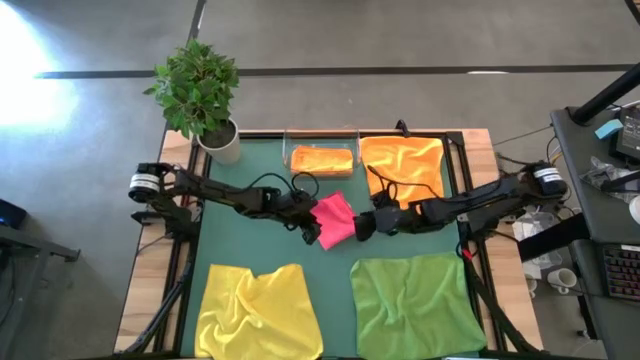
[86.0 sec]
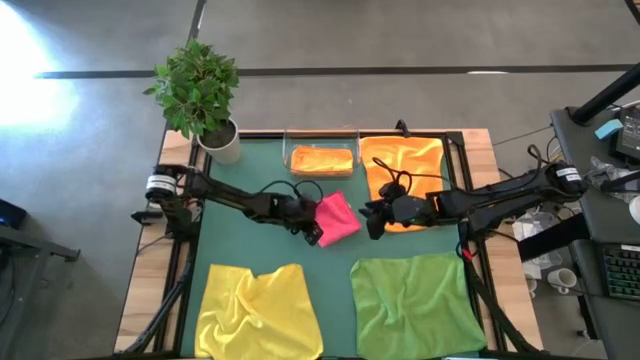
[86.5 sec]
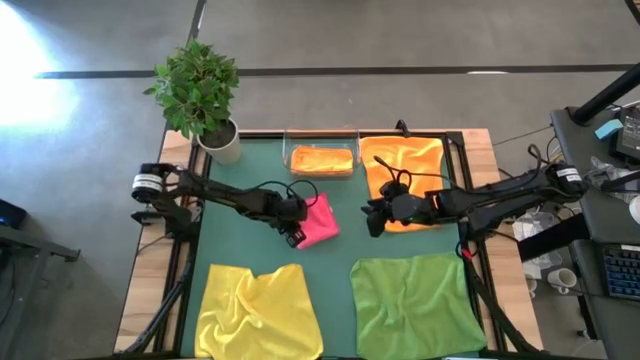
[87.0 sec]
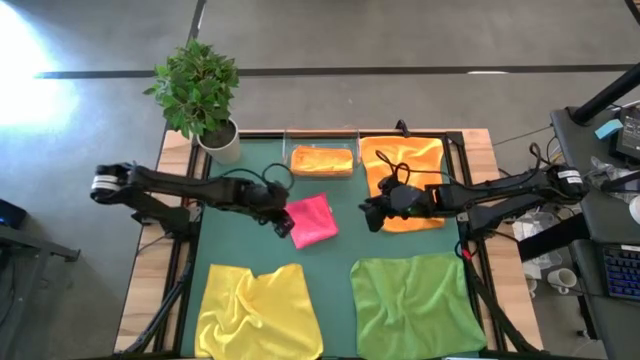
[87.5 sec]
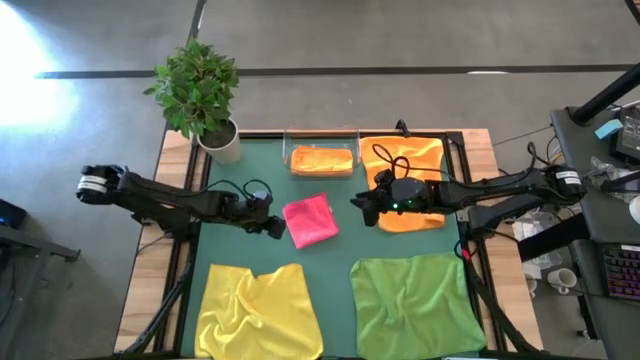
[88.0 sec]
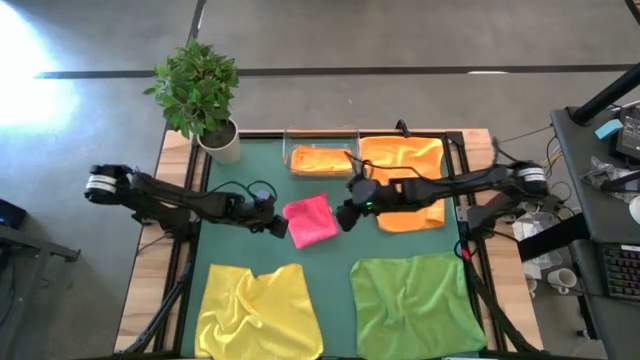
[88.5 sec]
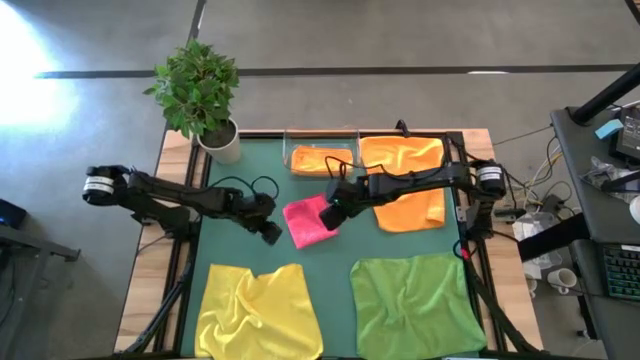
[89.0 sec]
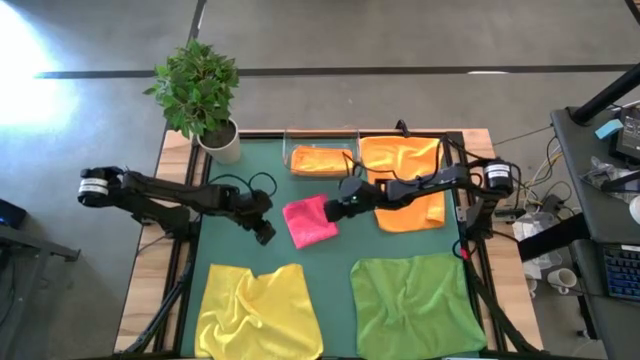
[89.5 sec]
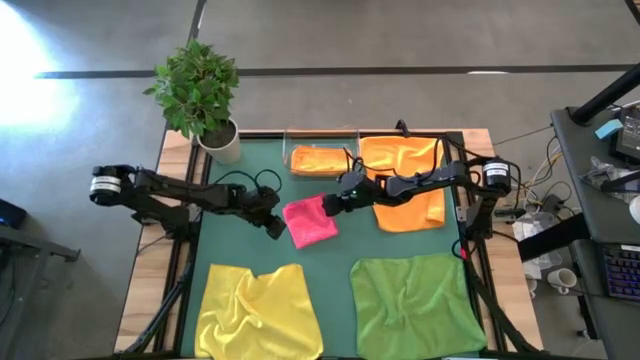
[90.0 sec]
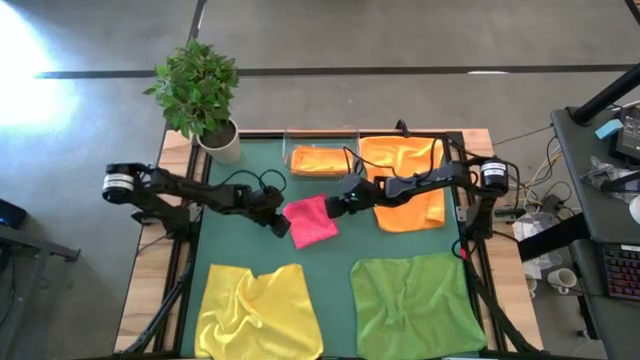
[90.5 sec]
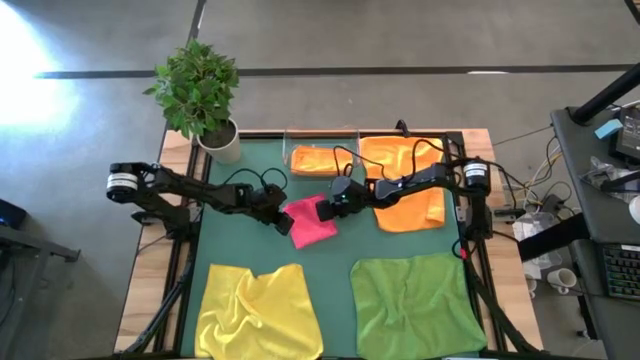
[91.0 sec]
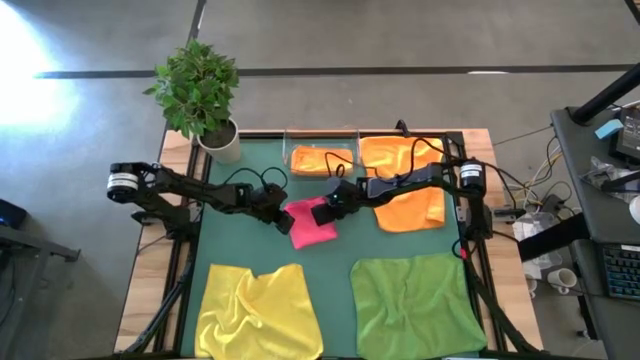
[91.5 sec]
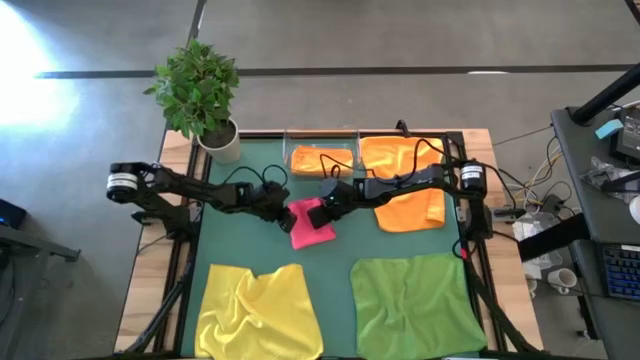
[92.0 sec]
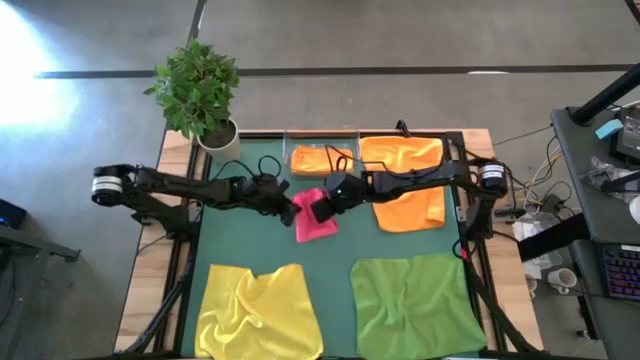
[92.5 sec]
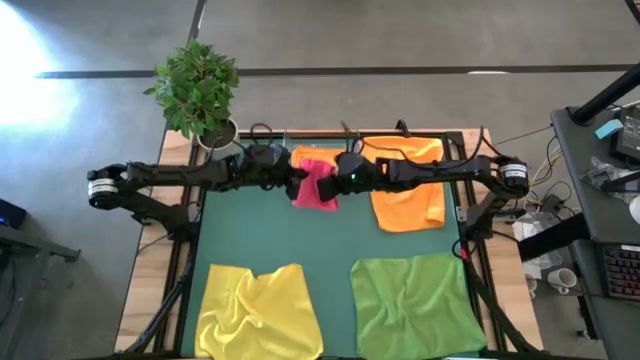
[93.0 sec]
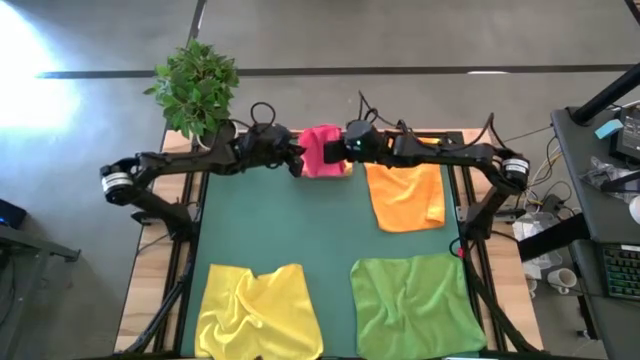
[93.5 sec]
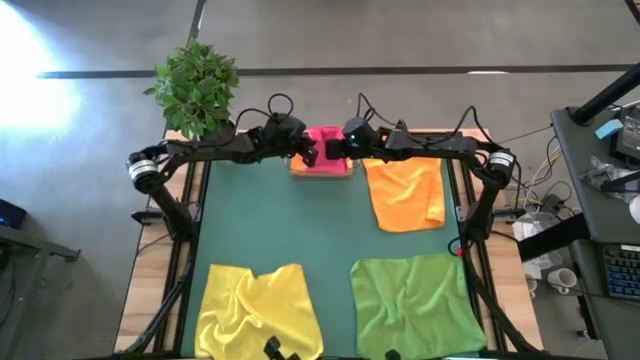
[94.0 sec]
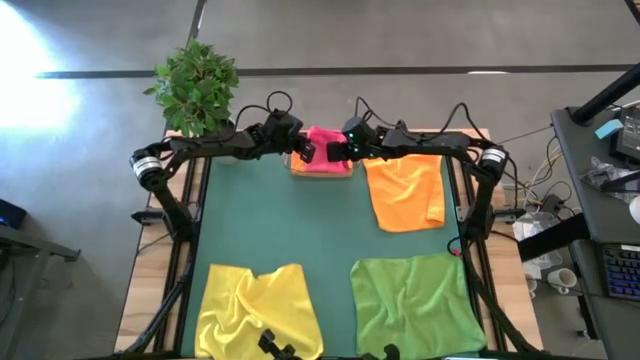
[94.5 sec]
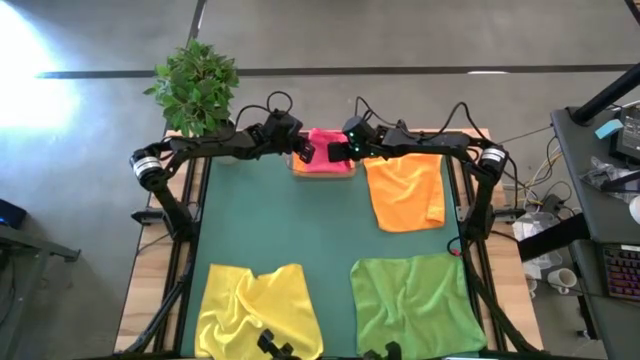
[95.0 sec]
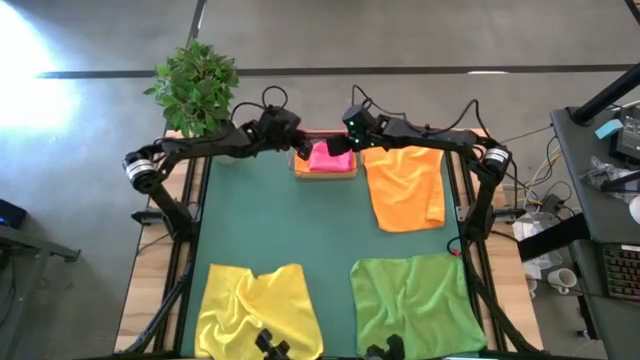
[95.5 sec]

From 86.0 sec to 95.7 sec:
Task: Fold microfiber towels
Put the pink microfiber cloth into the bin

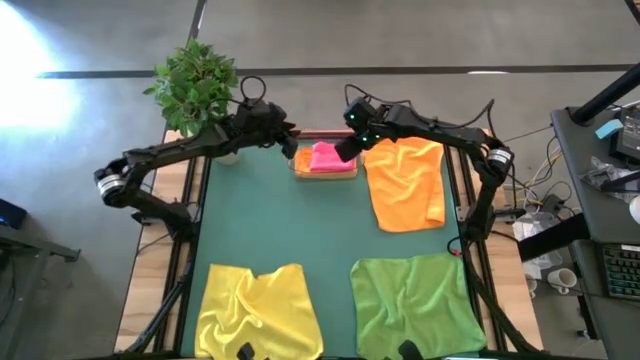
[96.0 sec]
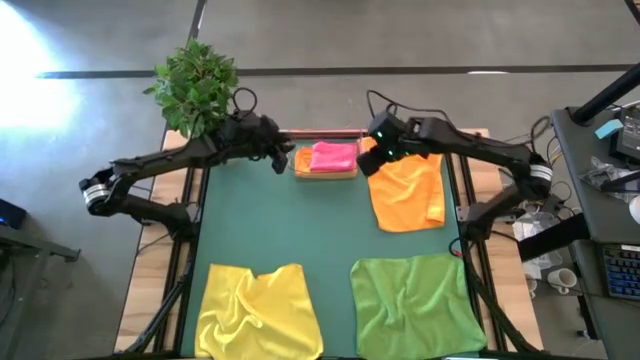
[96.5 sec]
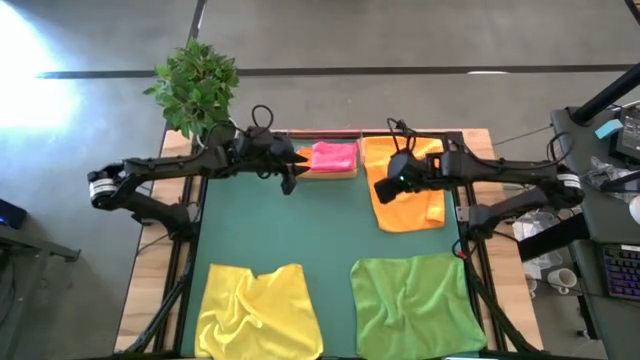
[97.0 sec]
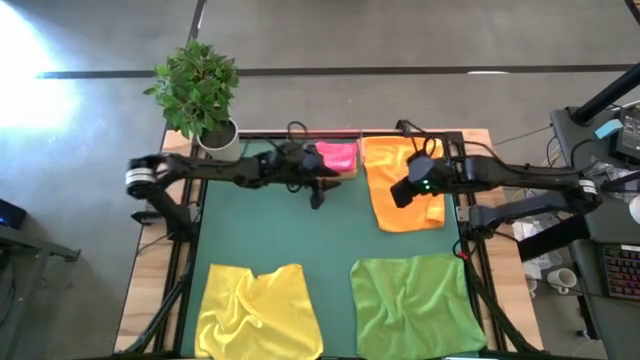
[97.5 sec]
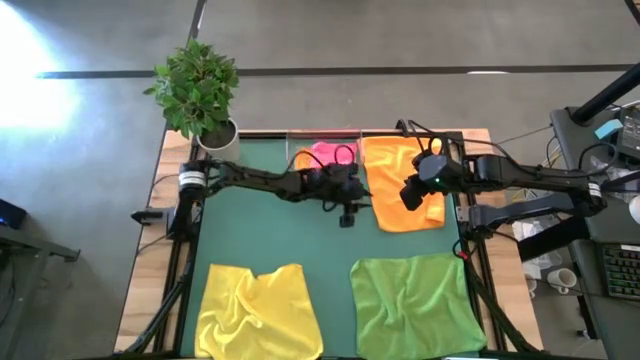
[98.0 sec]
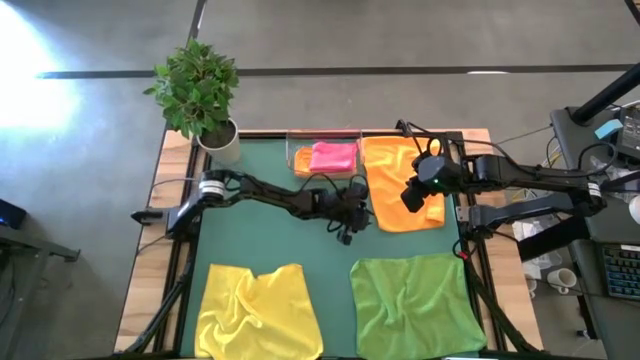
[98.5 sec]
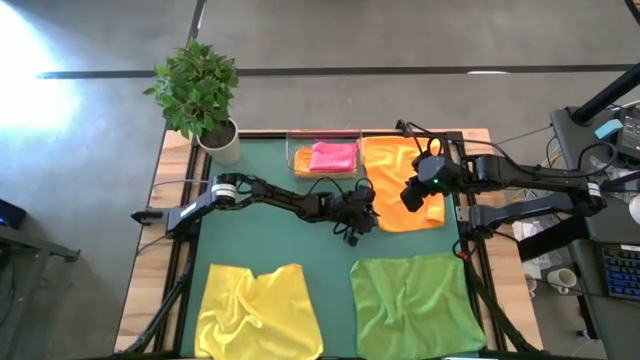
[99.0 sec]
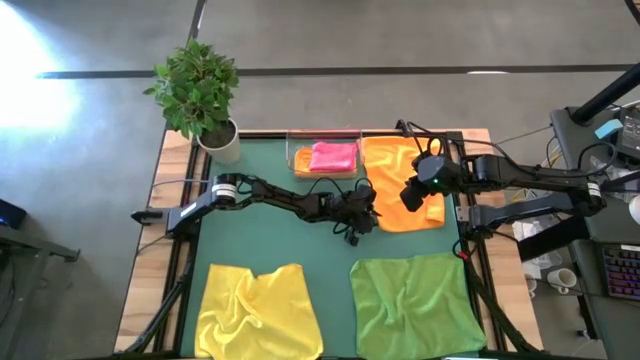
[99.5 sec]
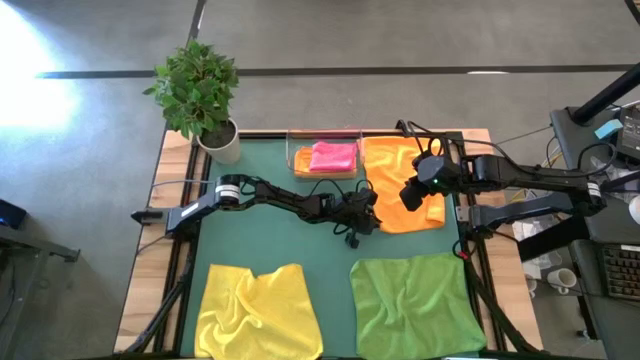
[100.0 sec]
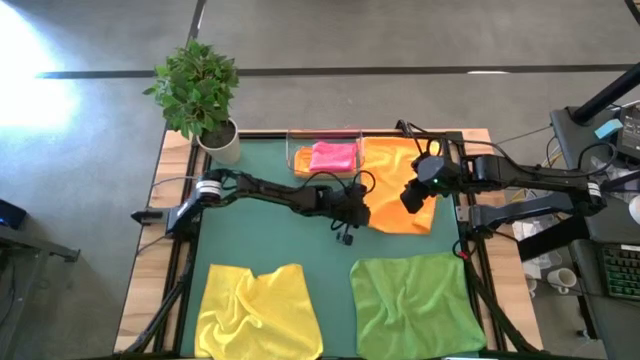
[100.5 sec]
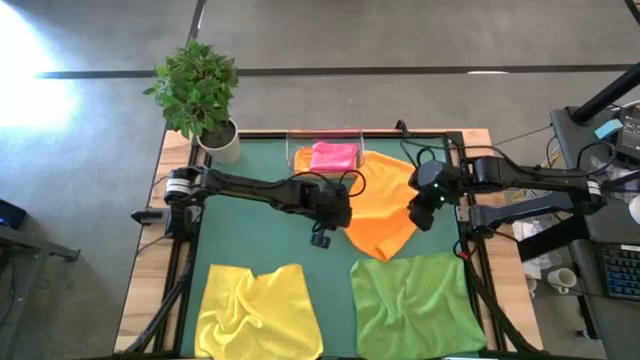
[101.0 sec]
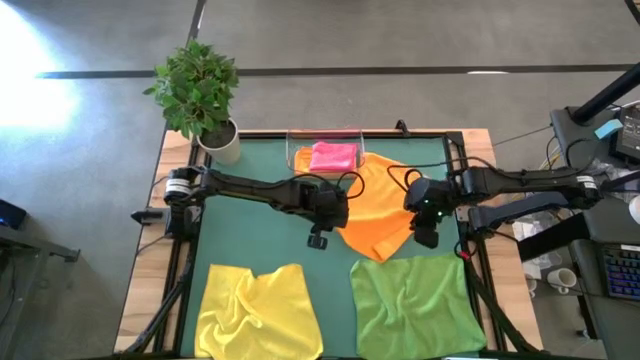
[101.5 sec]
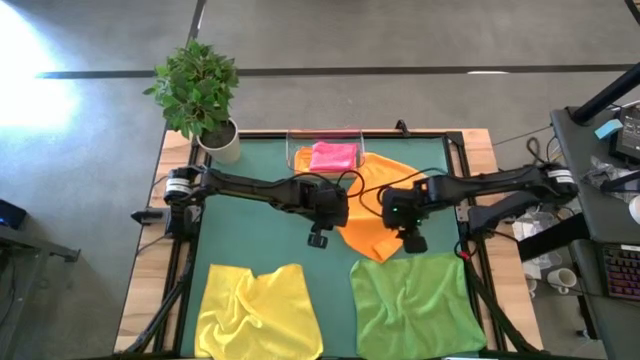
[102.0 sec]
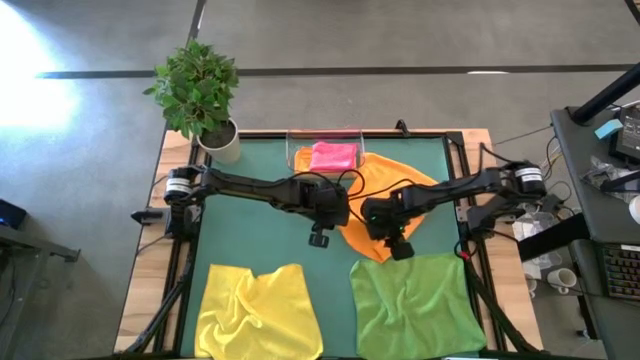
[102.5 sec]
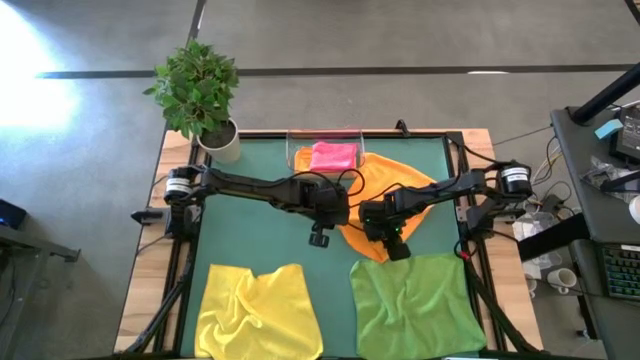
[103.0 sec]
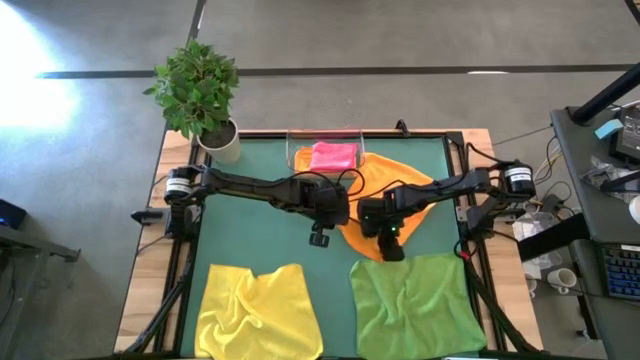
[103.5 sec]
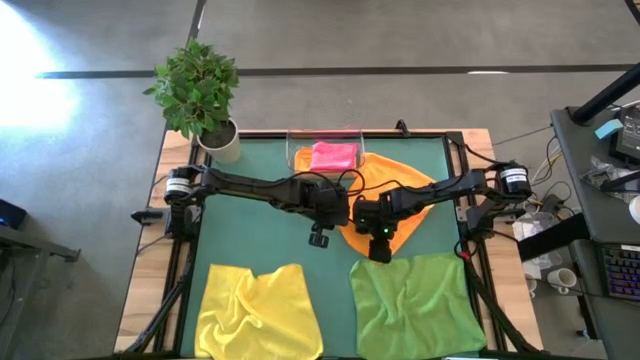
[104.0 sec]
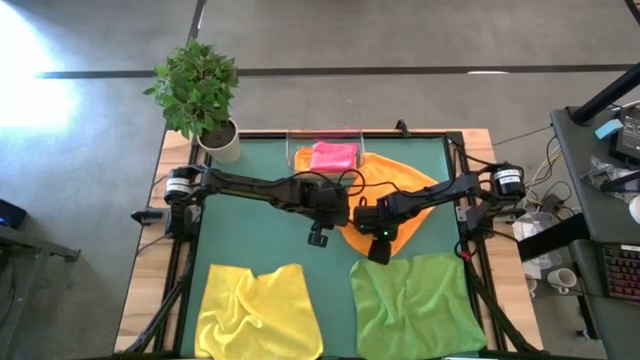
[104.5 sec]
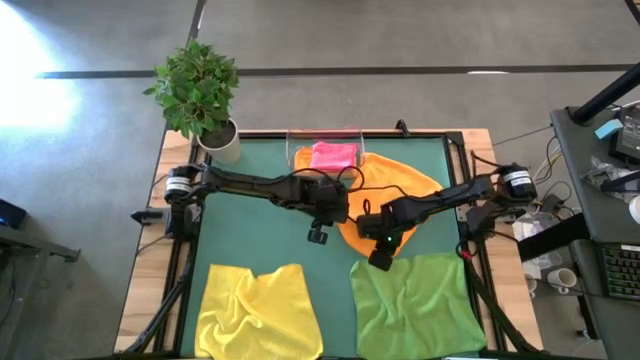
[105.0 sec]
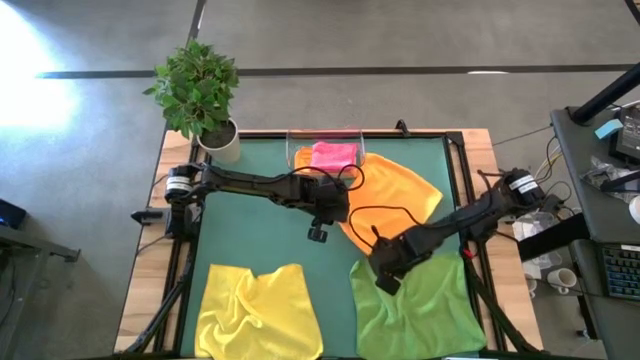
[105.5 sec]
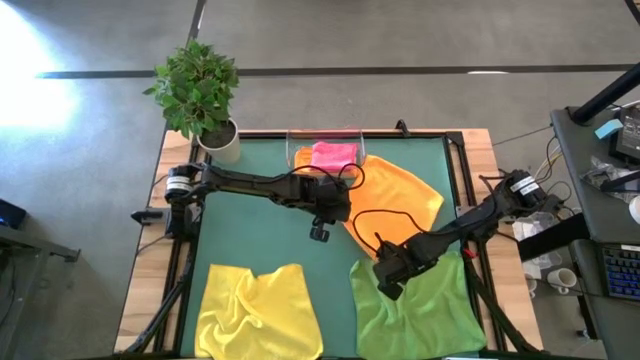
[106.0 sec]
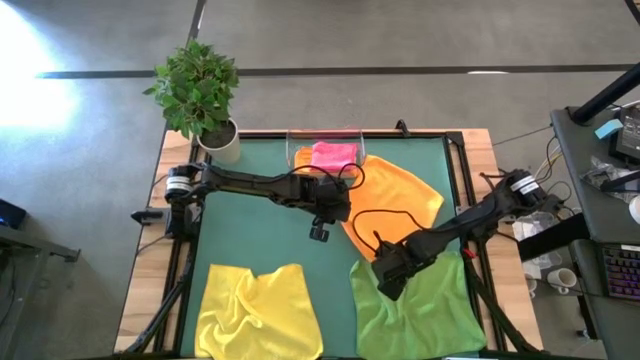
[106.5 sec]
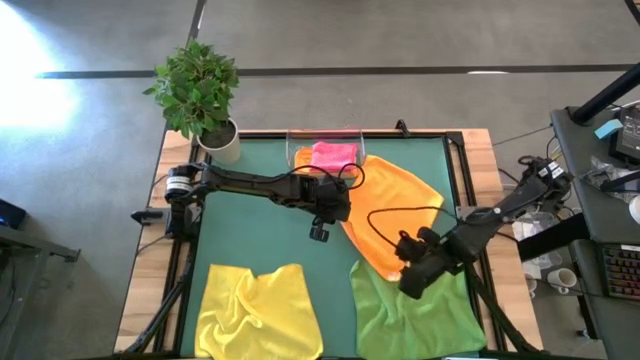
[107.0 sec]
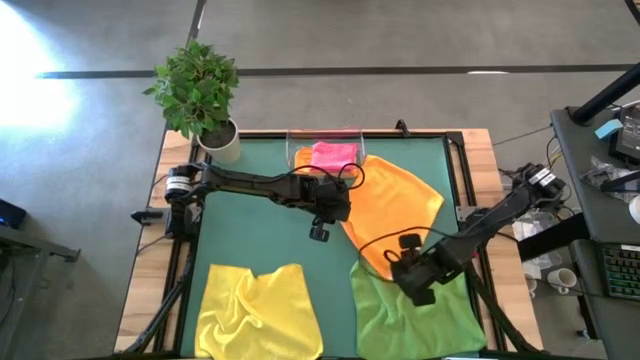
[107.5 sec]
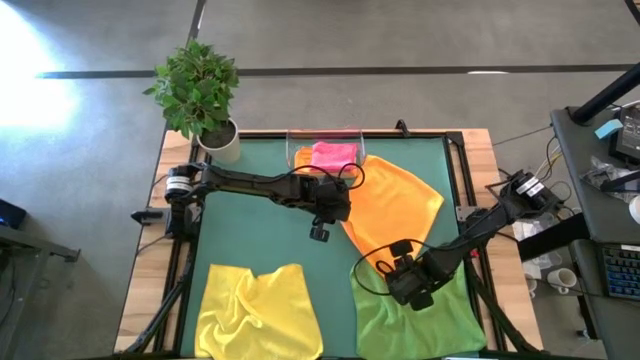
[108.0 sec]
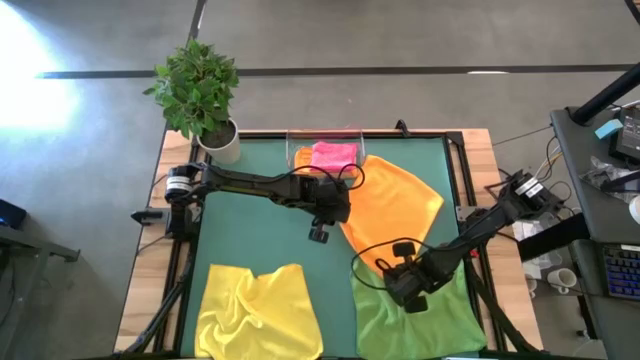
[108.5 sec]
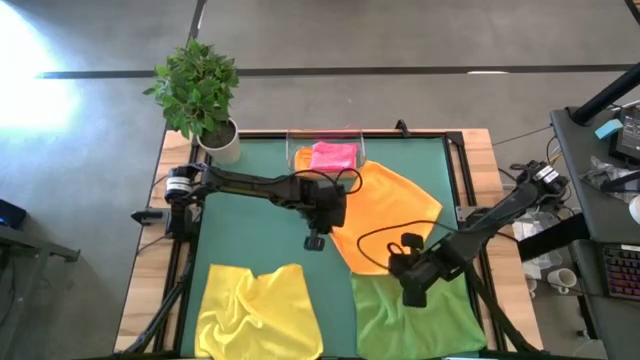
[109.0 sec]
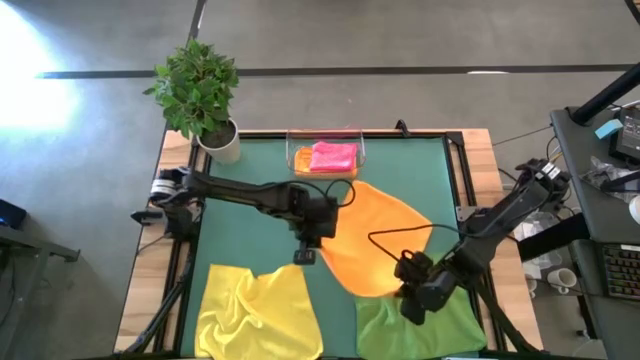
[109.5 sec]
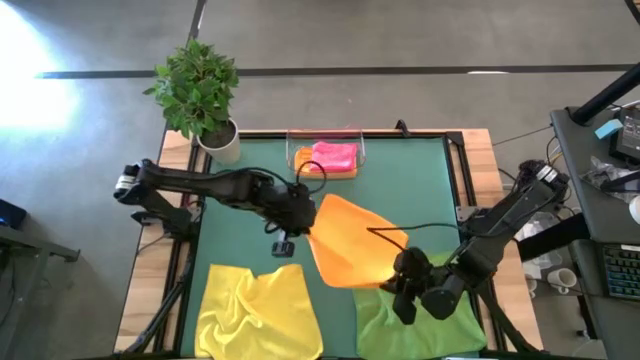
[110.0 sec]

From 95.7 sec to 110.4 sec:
Fold the orange microfiber cloth
